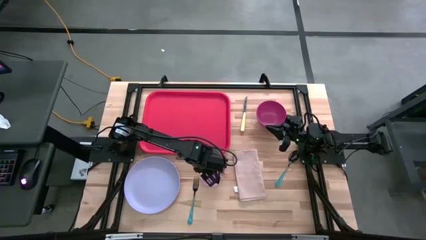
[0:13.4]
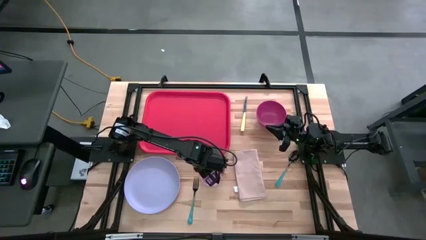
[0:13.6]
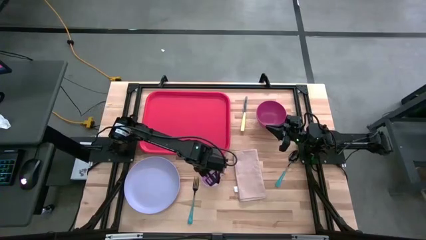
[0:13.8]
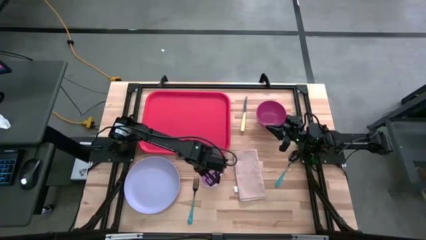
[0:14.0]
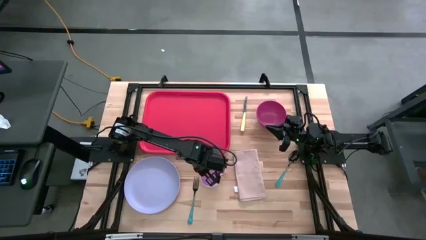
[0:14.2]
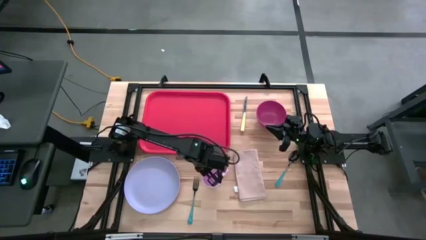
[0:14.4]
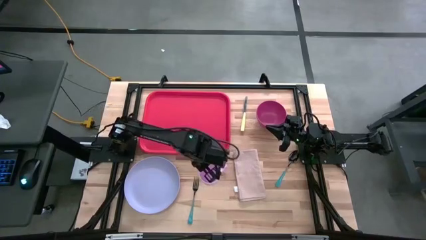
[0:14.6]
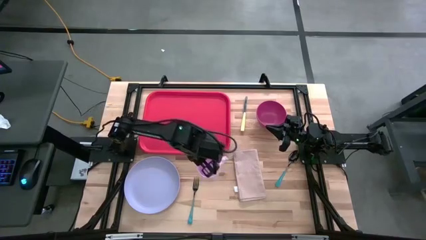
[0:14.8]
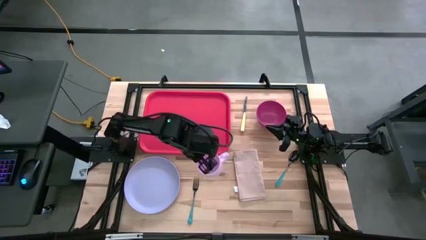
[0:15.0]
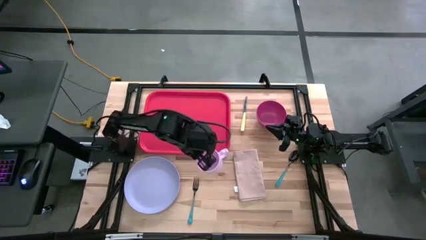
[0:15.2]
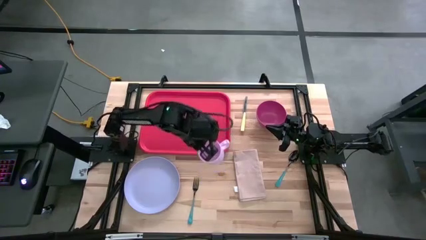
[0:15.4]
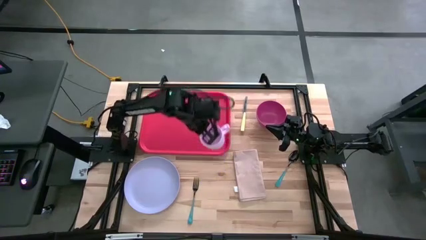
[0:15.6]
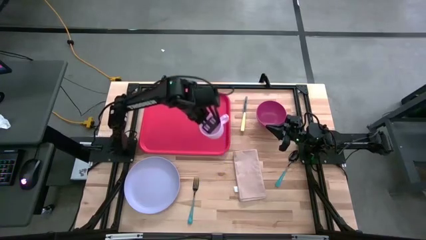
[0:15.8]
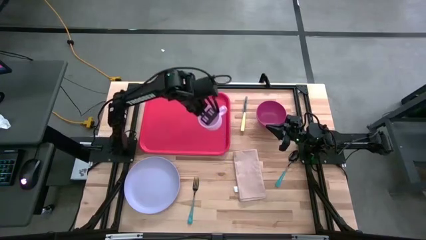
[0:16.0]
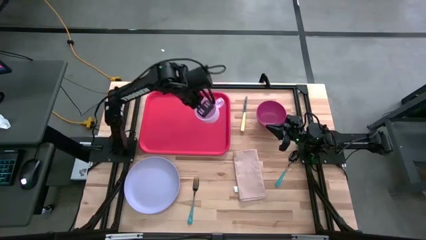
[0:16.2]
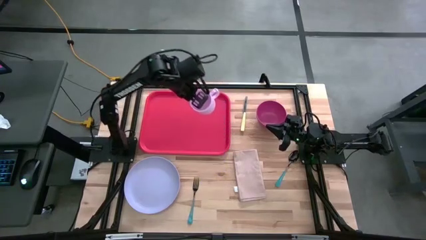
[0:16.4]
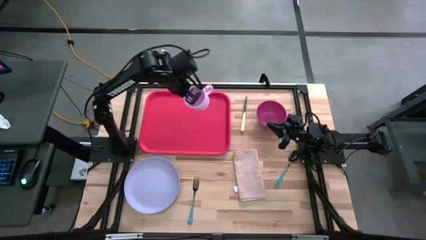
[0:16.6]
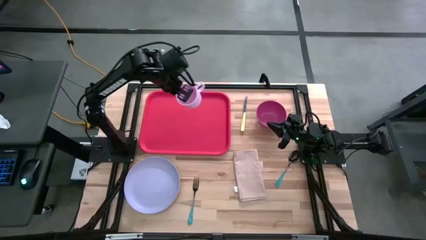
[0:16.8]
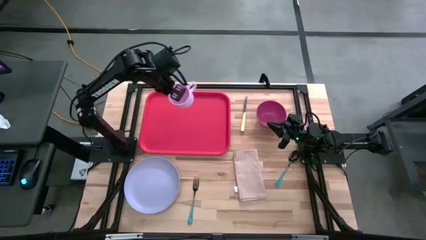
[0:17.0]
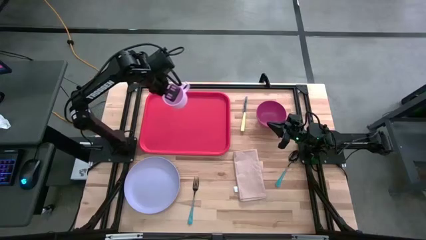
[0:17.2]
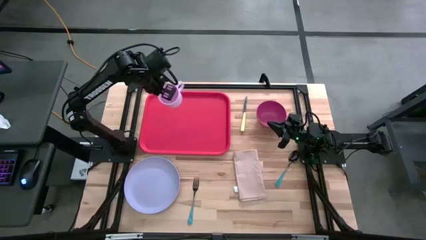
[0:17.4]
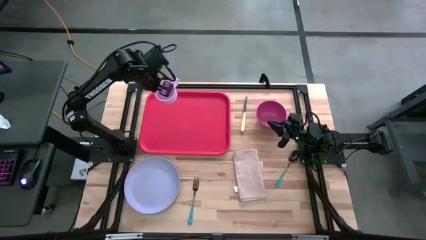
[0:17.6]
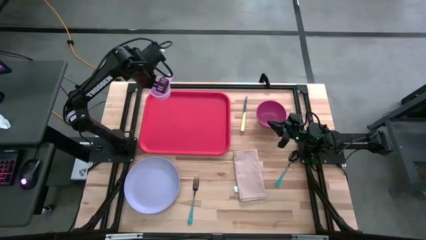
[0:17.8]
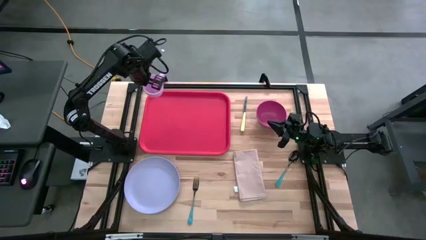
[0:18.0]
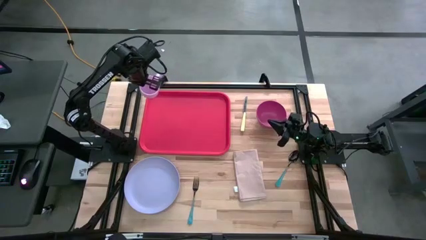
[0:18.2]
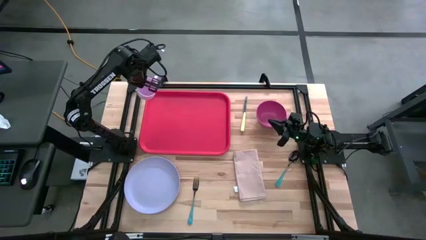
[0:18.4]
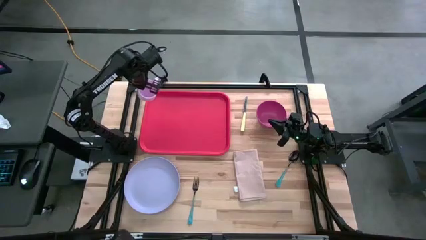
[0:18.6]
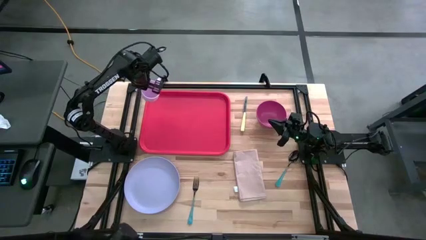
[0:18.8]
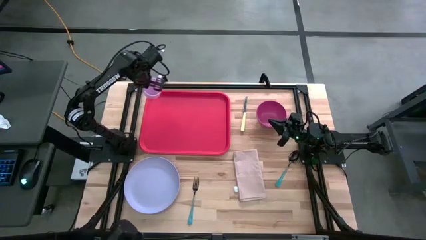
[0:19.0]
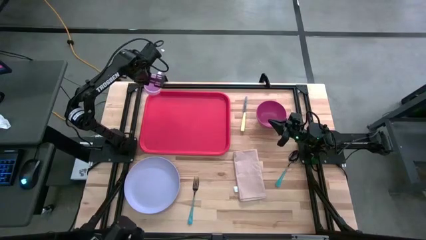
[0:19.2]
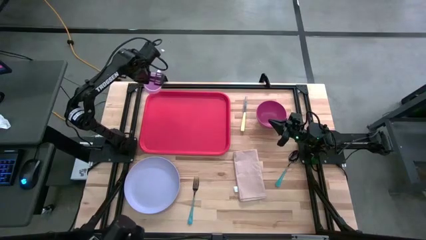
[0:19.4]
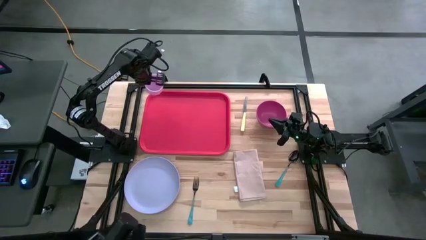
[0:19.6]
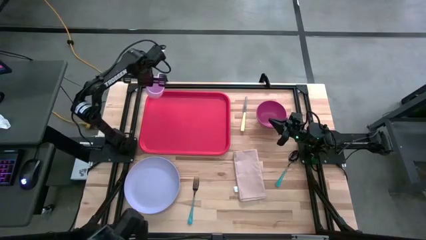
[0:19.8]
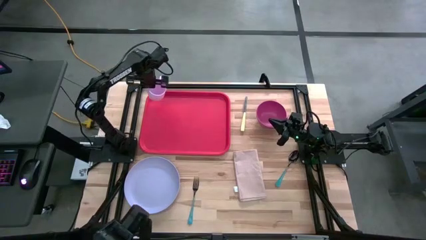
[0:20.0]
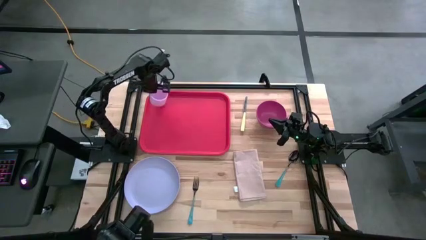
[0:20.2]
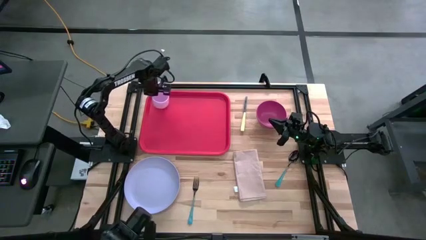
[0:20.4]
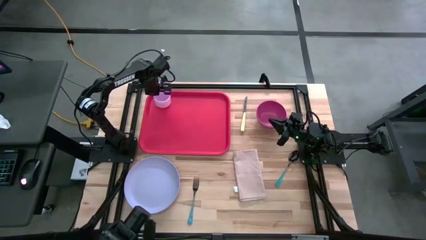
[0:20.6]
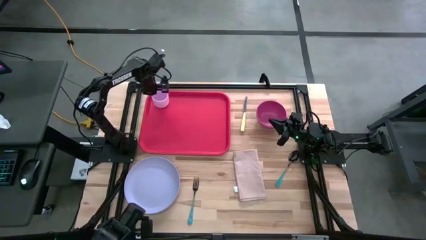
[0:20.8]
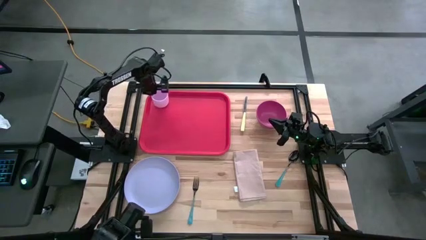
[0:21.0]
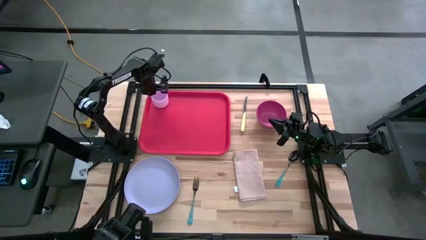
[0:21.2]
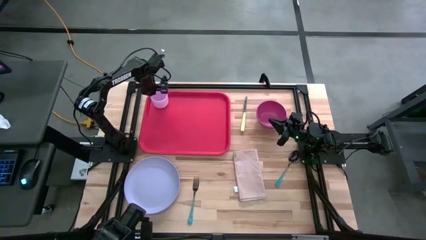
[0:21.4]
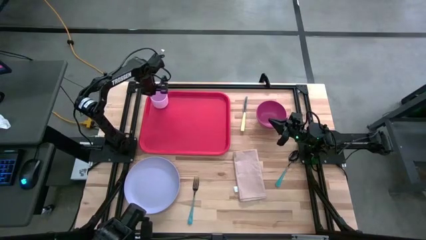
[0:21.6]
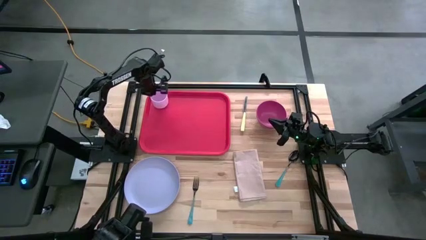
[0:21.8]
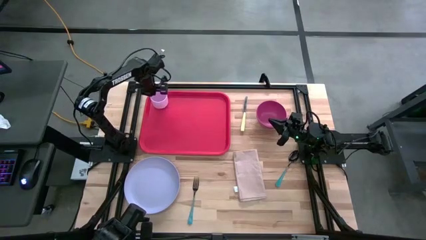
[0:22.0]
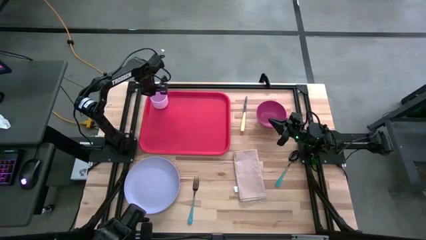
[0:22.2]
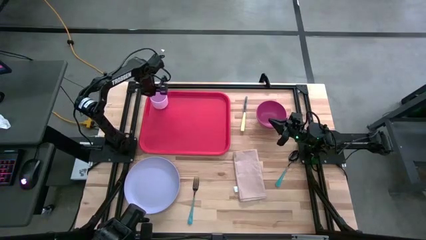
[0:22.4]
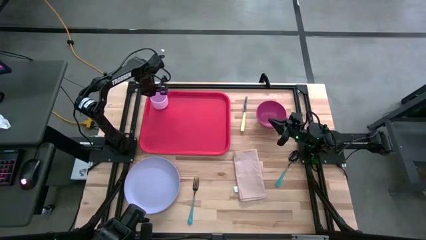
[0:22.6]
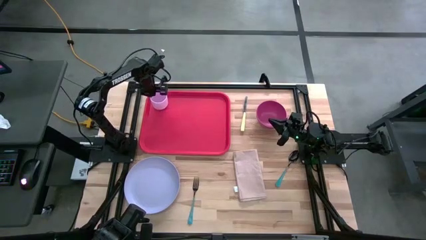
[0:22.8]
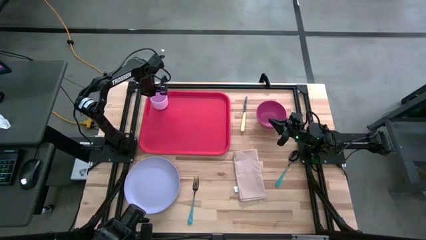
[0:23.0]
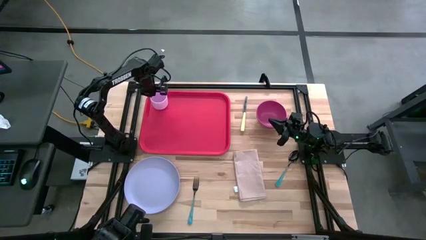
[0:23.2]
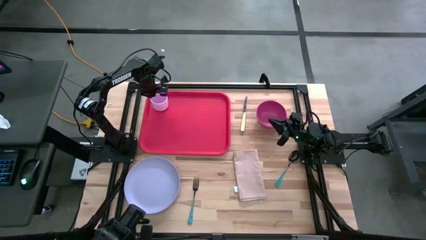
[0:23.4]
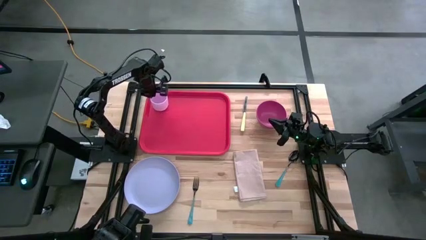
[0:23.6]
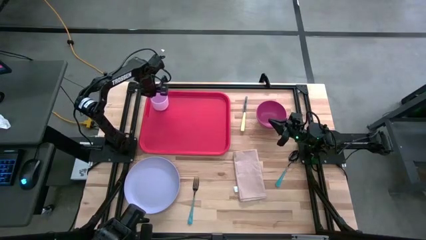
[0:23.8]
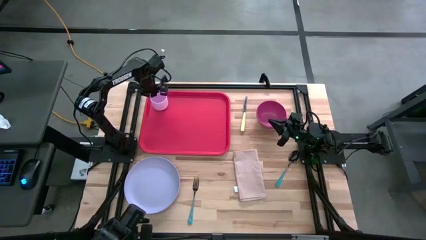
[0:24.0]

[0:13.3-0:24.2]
Task: Set up tray
Put the pink mug on the red tray

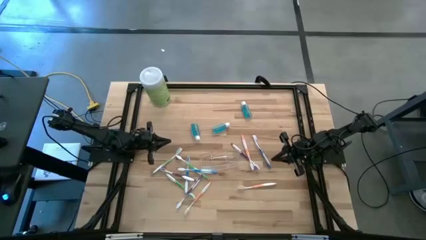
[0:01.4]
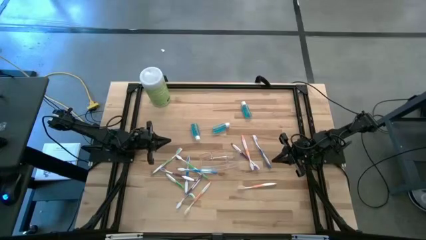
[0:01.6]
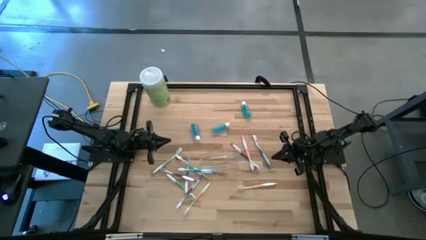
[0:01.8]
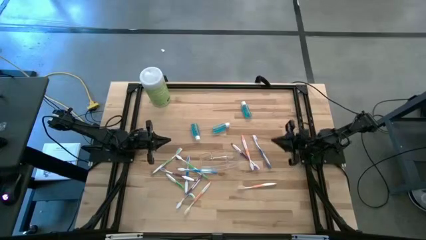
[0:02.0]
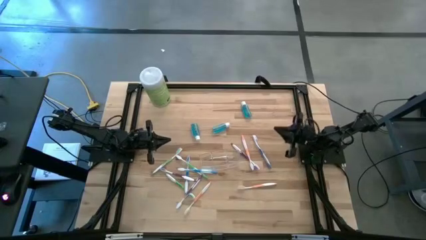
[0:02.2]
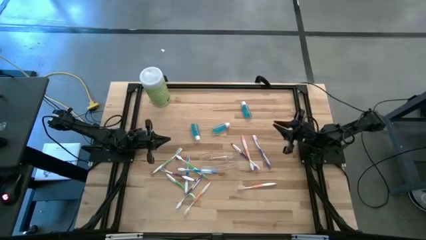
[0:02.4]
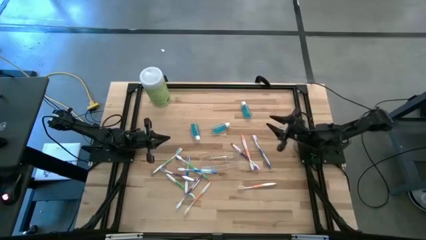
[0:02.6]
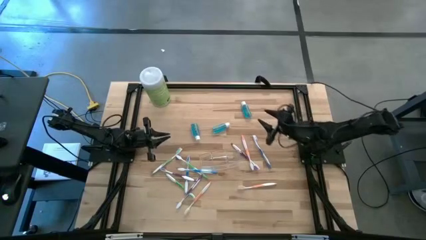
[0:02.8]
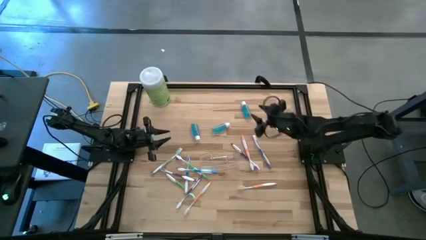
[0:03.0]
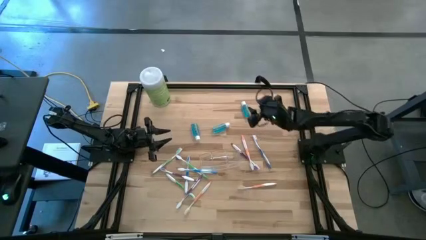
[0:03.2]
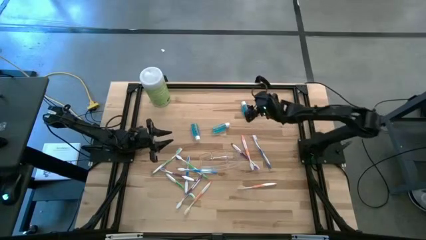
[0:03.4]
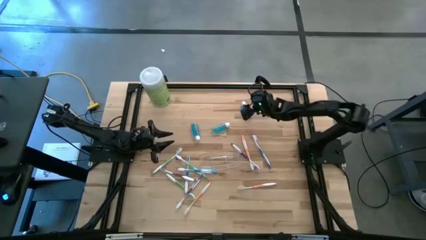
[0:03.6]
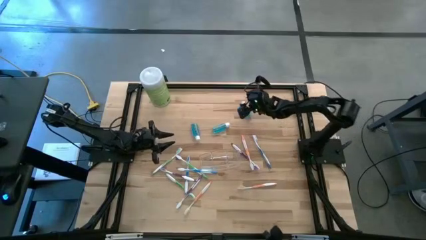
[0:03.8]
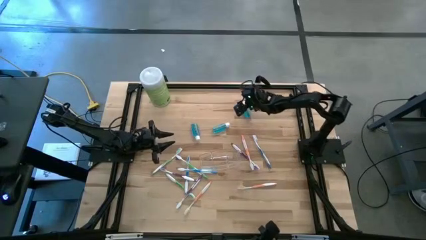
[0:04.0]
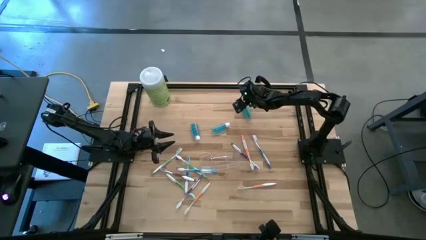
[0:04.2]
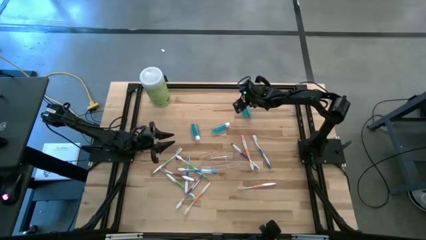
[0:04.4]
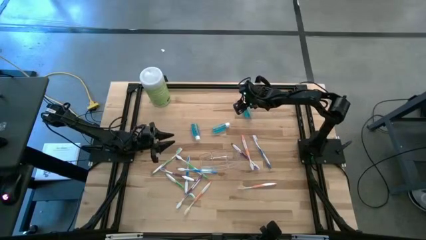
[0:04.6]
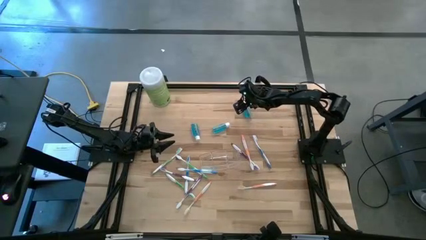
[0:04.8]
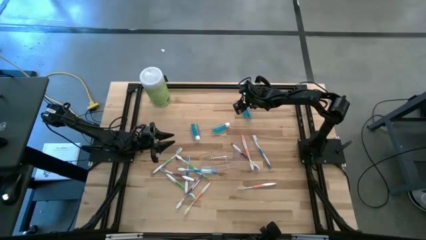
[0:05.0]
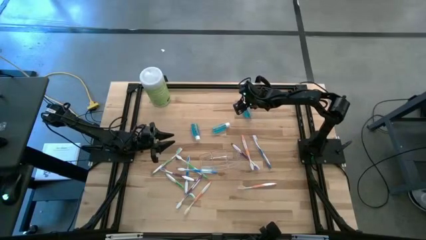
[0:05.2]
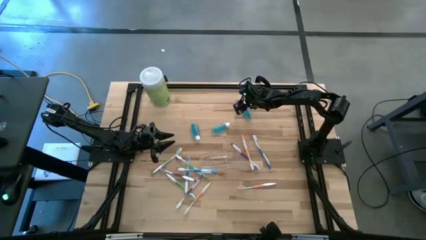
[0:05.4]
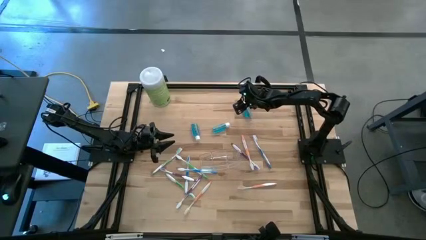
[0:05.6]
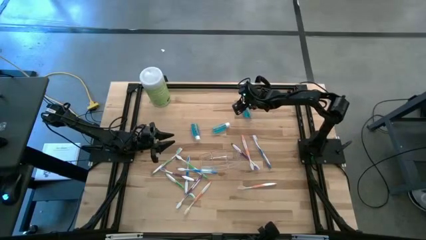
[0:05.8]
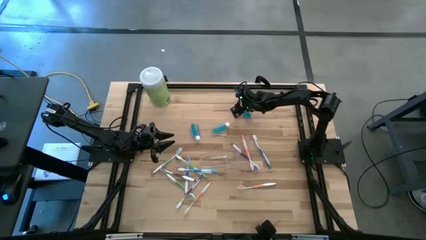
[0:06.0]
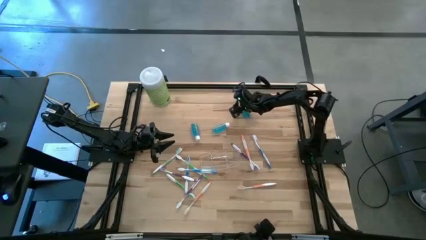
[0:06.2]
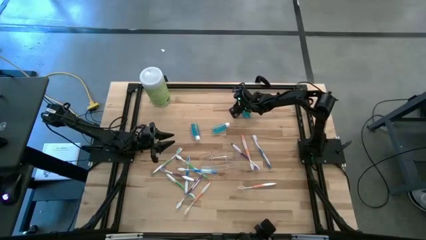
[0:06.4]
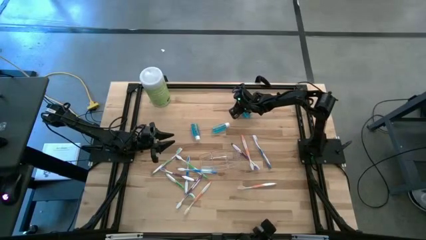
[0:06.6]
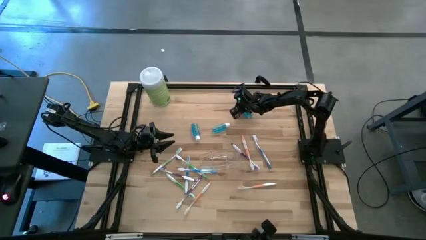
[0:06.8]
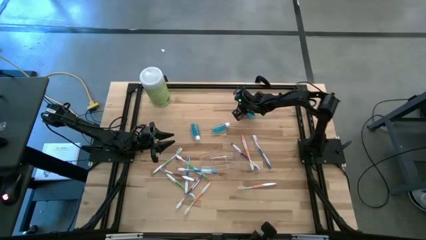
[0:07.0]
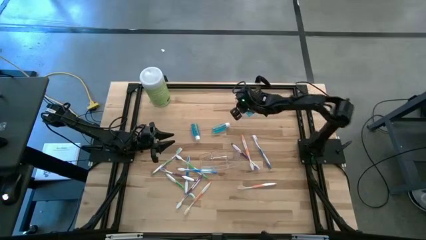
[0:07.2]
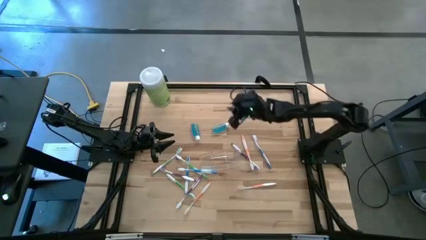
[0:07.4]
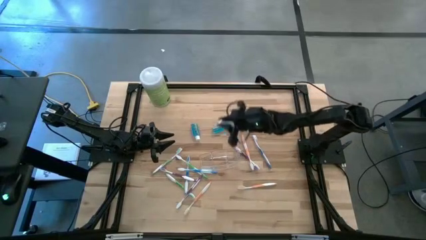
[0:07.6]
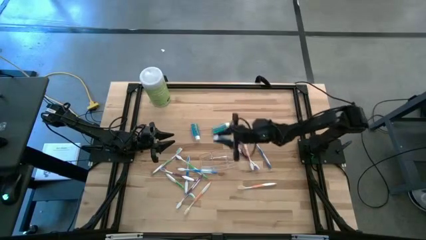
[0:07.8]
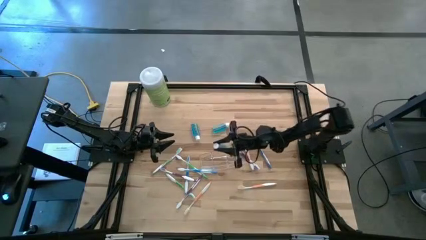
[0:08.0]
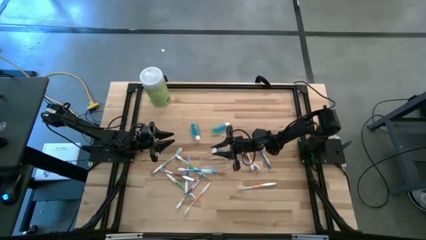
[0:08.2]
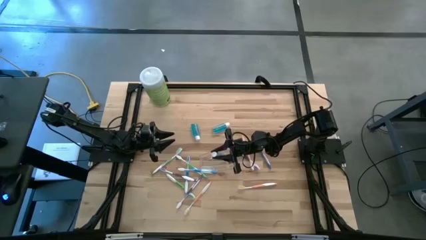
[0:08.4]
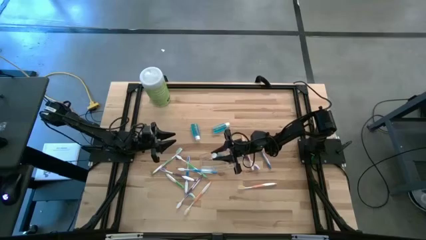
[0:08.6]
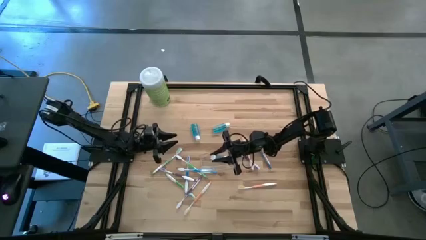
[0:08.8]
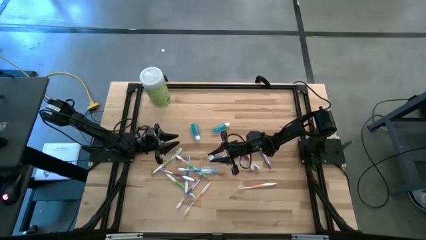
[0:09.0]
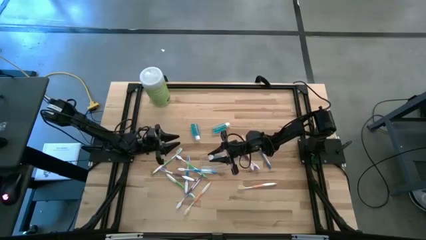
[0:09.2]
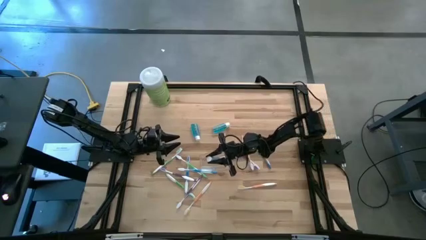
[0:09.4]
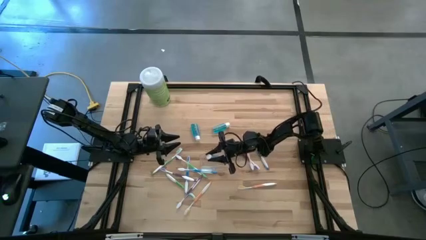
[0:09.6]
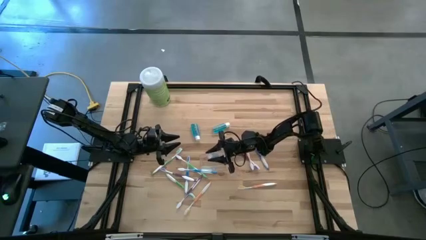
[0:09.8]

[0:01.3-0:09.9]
Task: Pick & Place toothbrushing station
Put the right mouthwash into the transparent organizer
